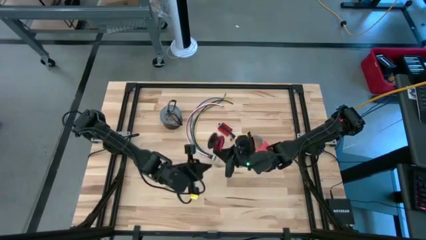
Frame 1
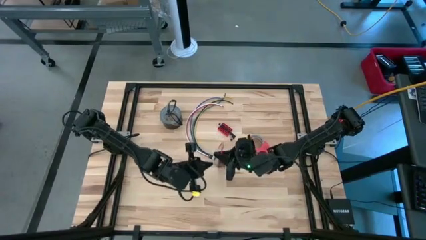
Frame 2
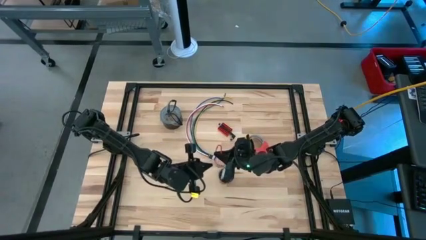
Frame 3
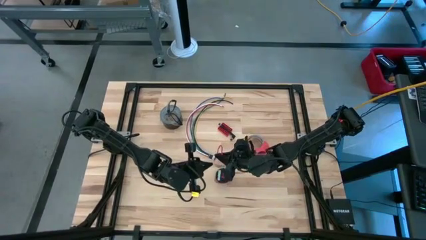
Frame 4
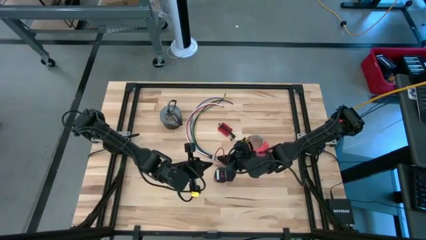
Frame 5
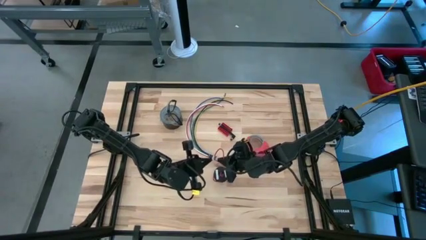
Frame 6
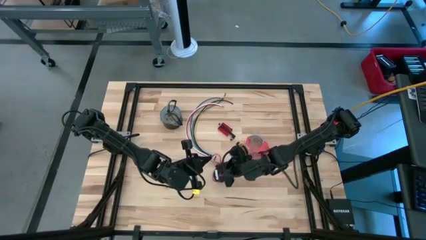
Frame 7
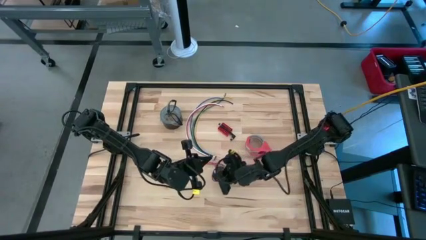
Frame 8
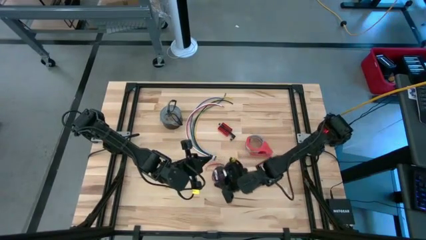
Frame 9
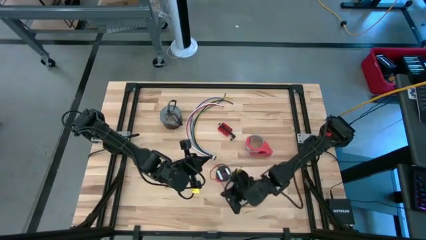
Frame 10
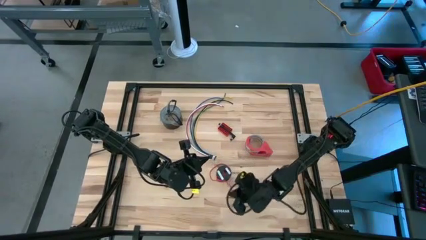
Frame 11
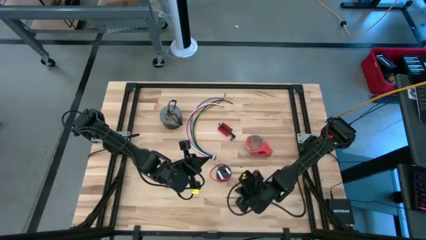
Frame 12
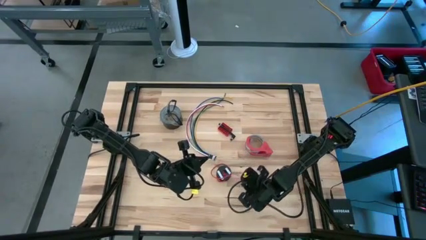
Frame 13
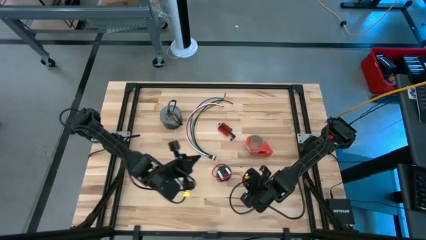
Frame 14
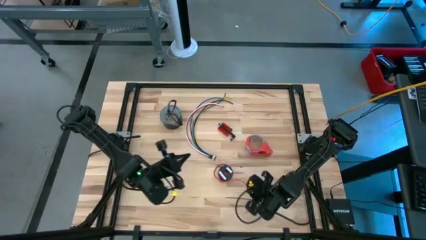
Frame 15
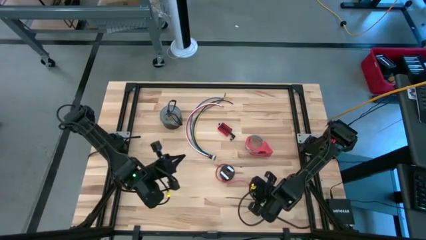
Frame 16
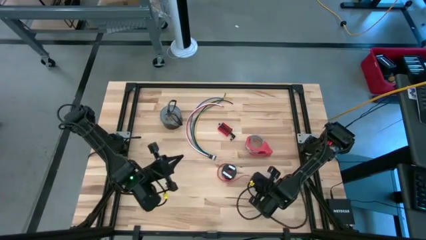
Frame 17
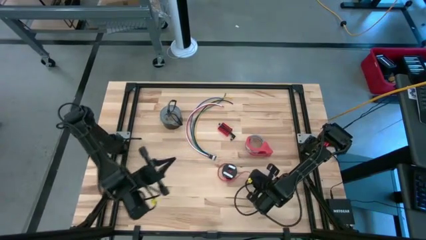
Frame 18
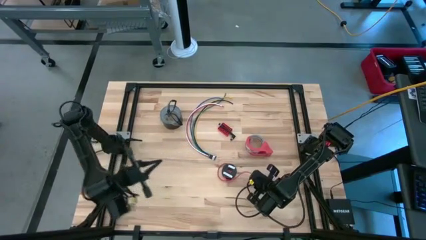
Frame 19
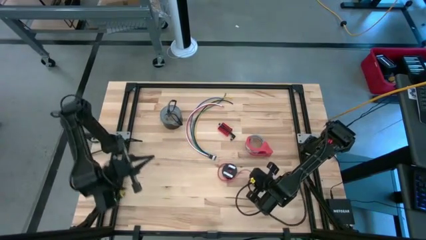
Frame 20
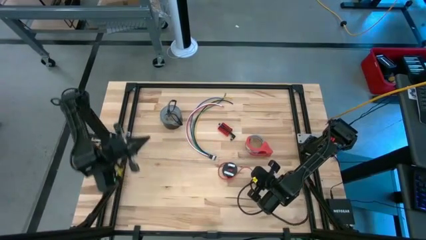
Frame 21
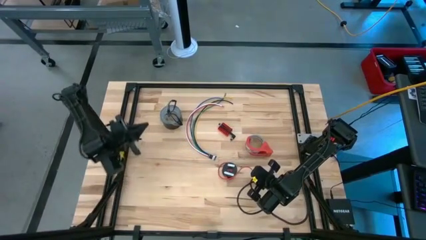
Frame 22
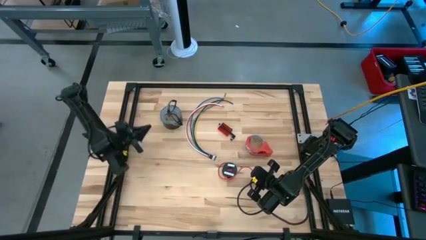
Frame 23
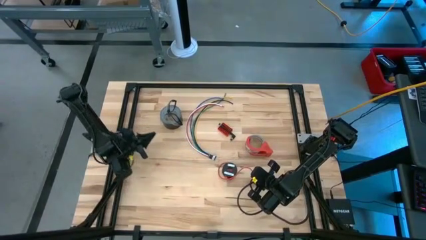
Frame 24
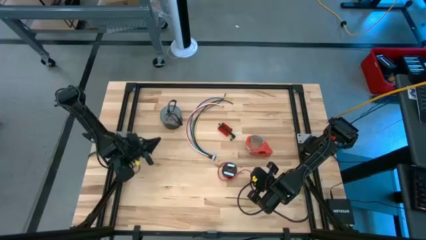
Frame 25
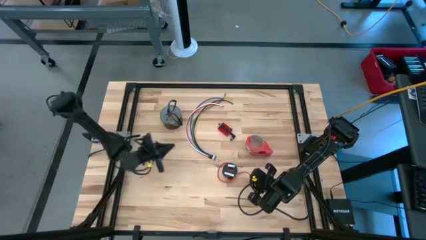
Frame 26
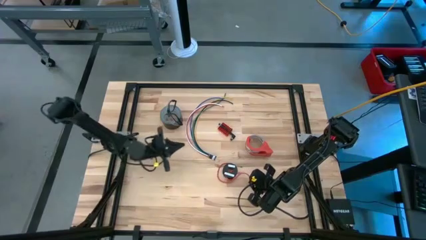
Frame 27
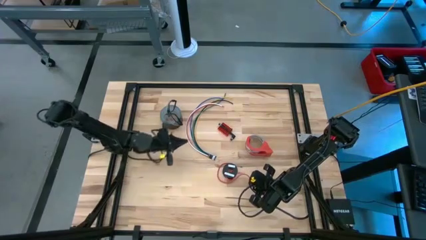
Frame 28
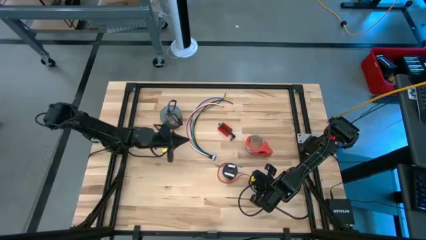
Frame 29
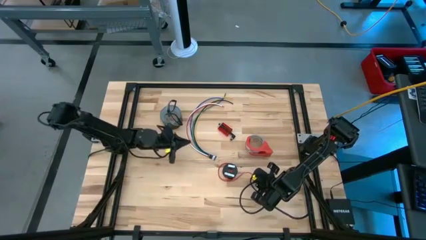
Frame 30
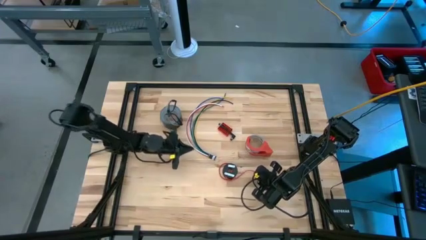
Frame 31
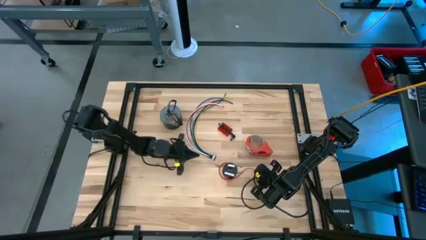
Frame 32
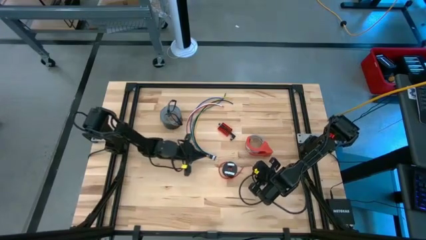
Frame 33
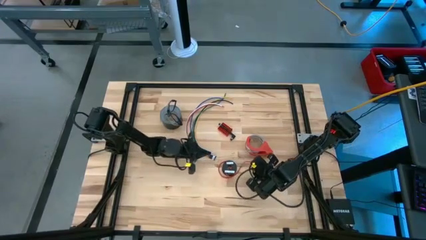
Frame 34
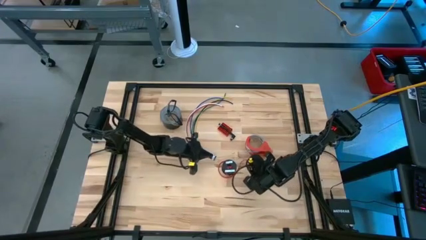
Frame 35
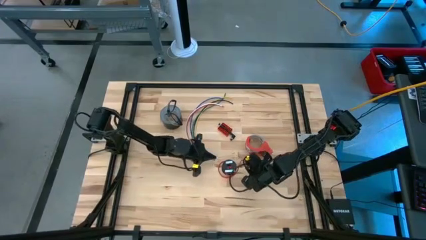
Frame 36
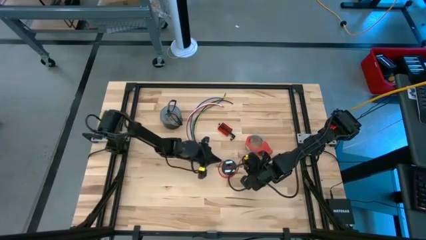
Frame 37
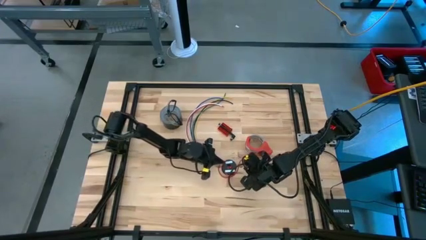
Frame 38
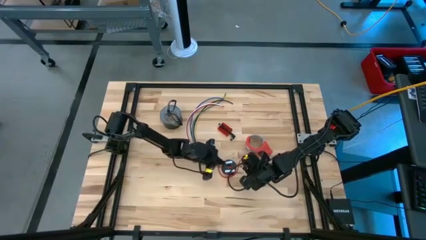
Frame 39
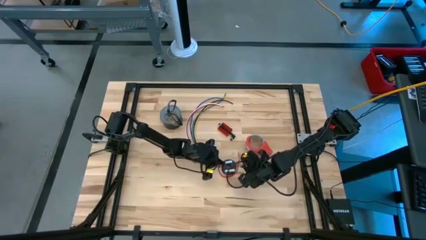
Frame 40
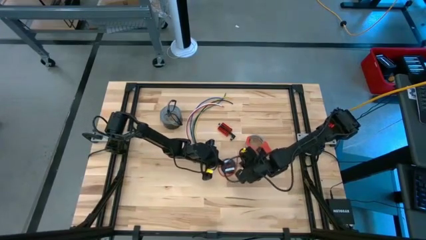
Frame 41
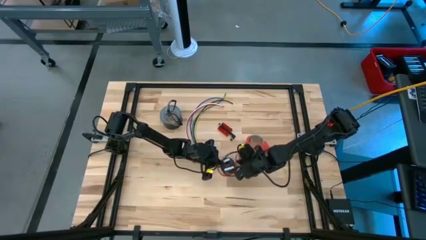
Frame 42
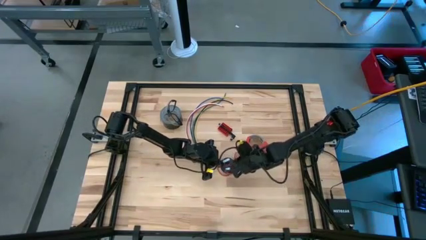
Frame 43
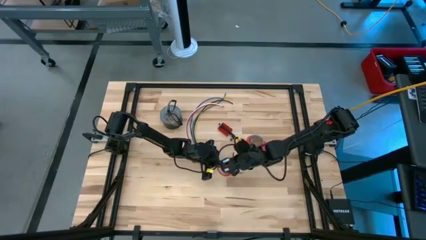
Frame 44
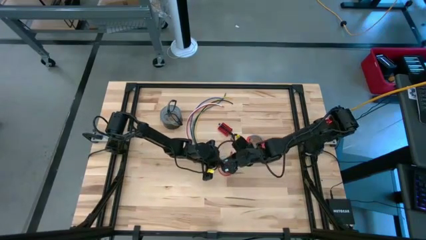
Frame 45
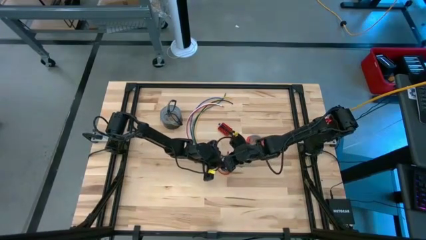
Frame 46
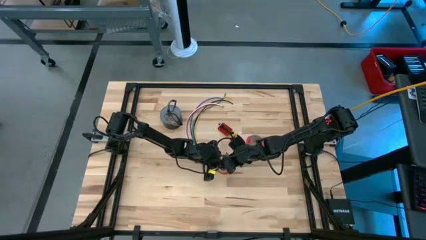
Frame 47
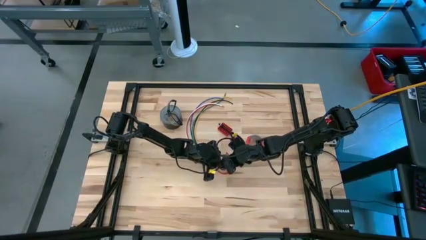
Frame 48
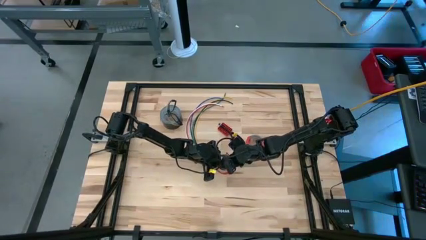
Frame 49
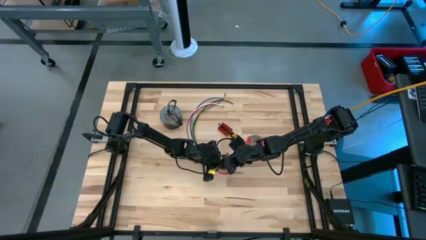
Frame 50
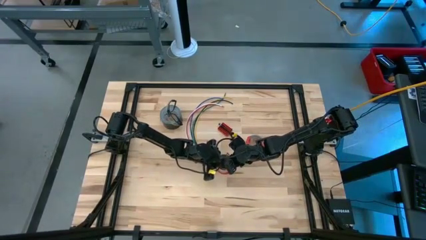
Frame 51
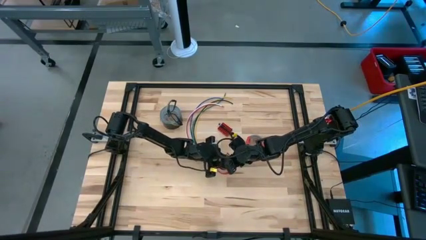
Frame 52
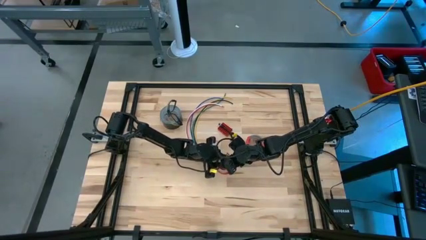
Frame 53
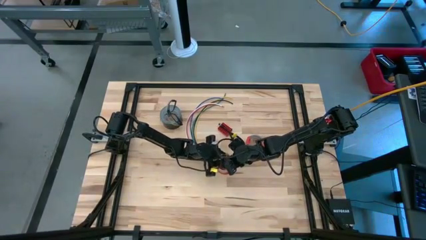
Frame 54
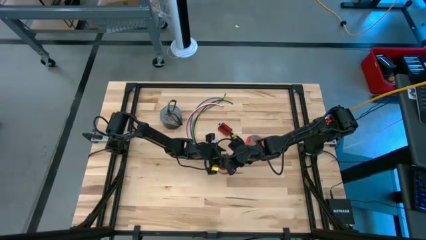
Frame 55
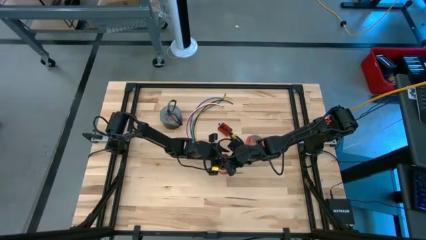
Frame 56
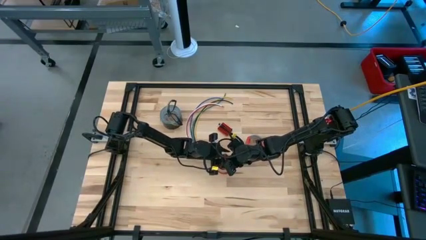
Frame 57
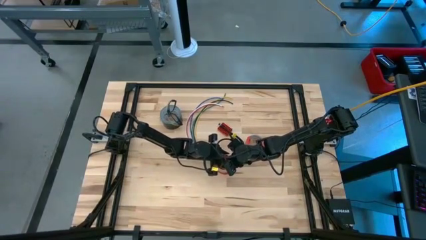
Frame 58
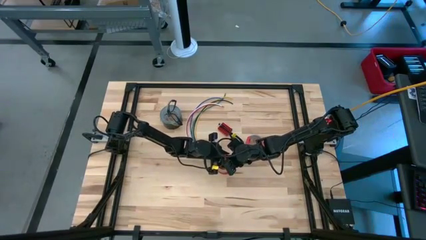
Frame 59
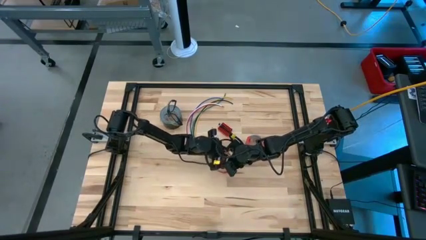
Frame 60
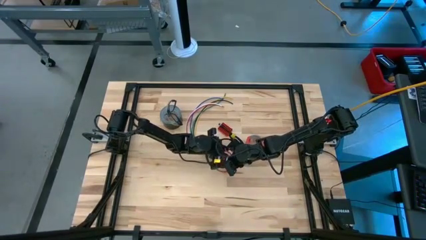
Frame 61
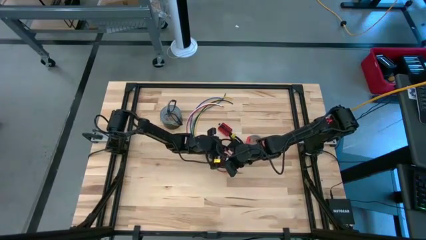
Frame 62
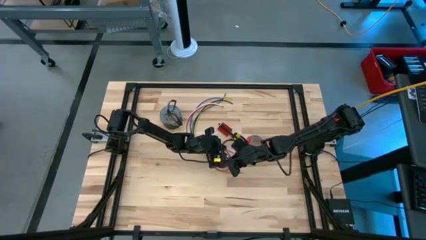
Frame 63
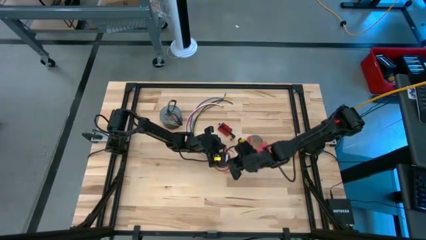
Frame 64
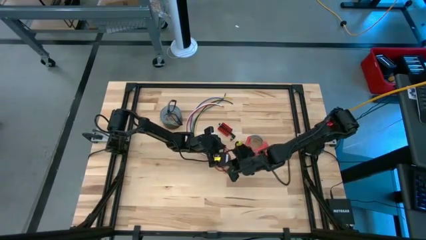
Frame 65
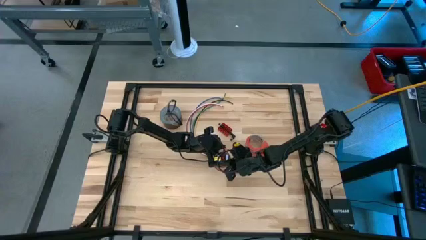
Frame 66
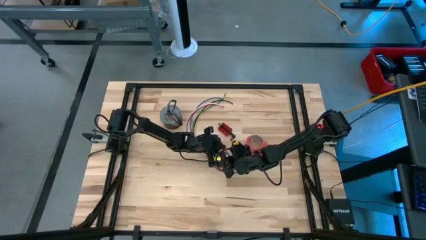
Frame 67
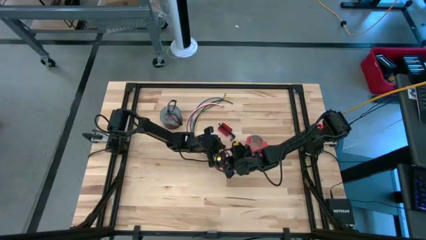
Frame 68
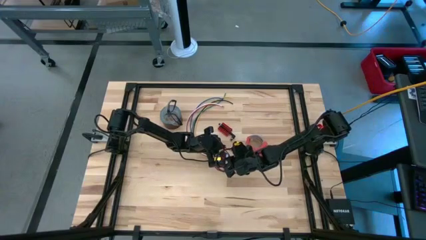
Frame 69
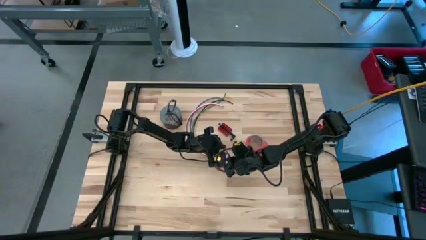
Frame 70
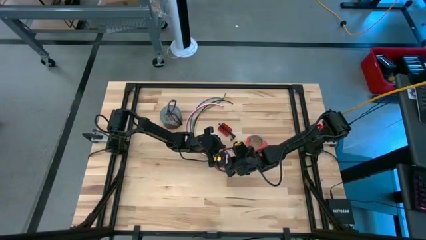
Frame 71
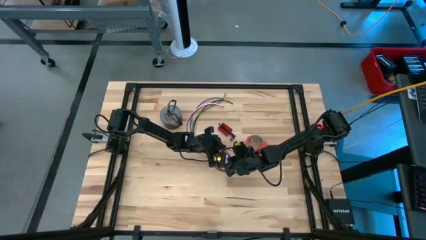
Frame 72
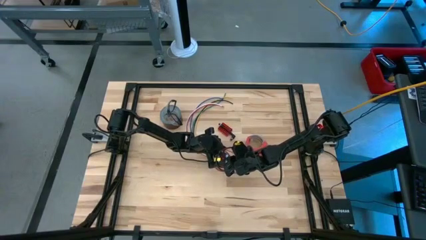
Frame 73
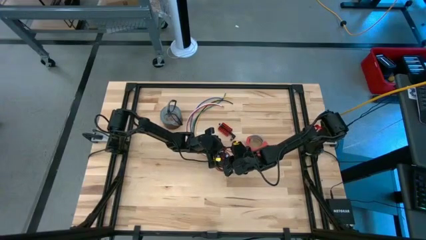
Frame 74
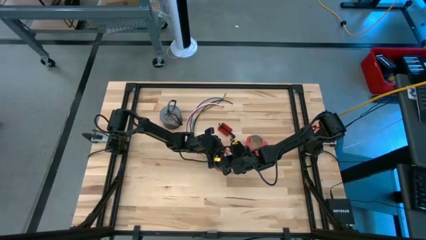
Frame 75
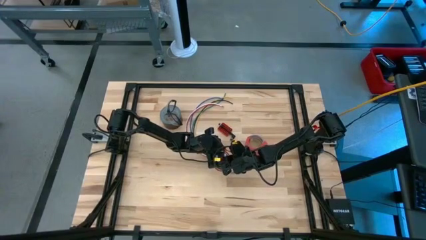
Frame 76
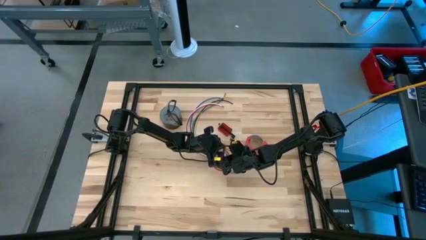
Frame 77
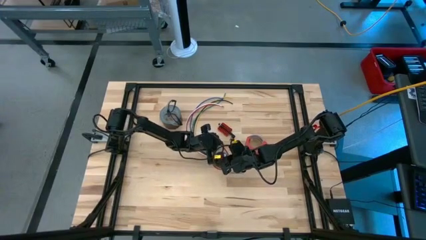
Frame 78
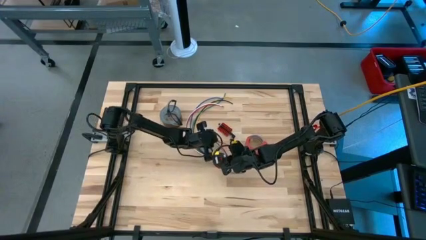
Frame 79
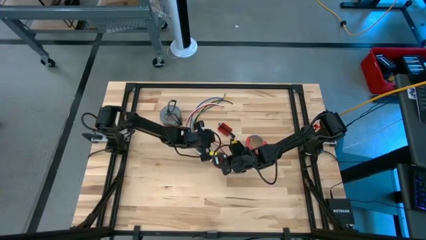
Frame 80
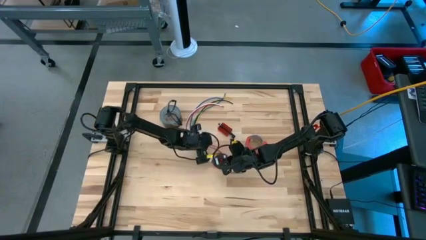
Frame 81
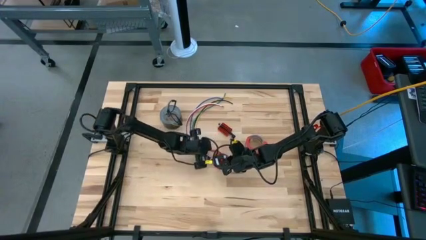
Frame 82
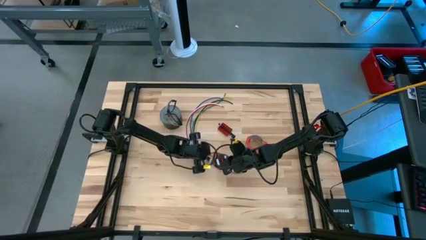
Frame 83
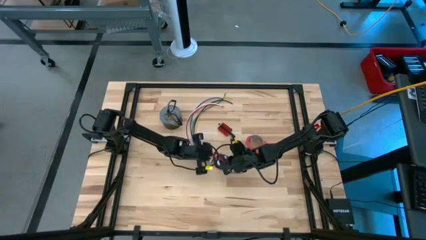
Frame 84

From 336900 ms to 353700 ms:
Task: Coil cords
Coil the red wire onto the spool
